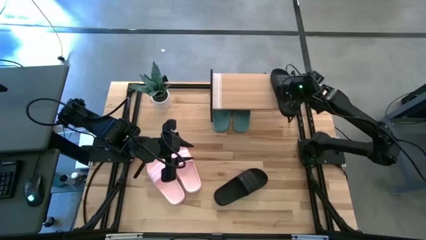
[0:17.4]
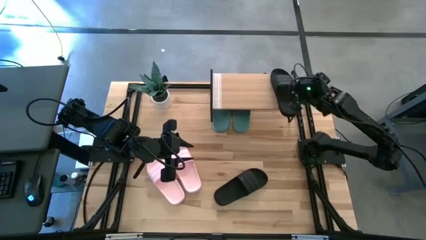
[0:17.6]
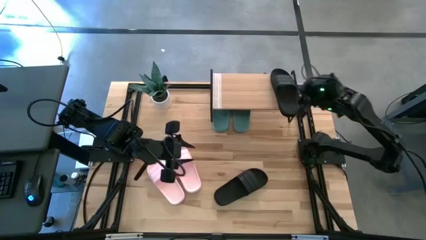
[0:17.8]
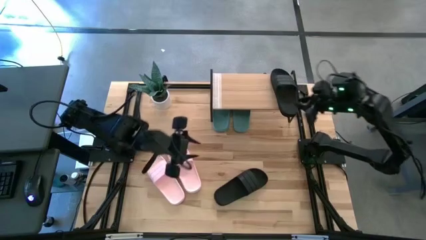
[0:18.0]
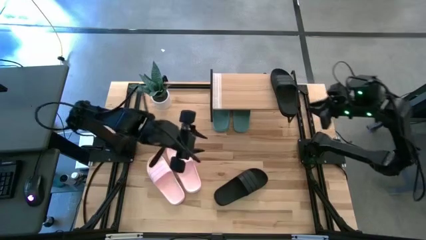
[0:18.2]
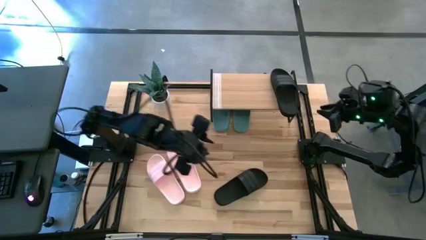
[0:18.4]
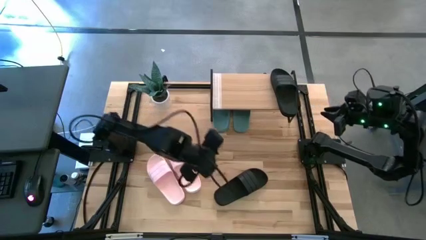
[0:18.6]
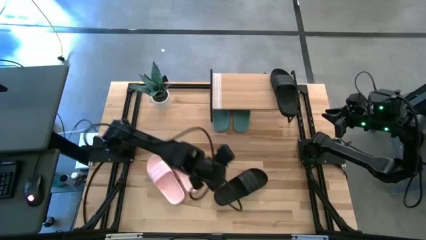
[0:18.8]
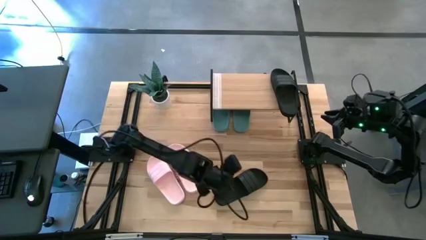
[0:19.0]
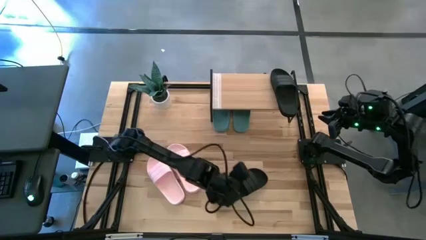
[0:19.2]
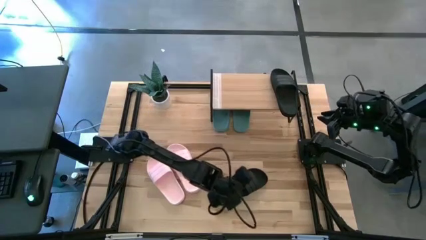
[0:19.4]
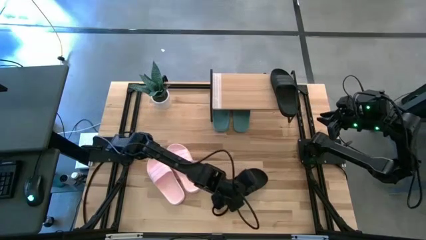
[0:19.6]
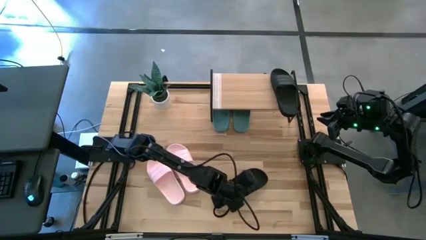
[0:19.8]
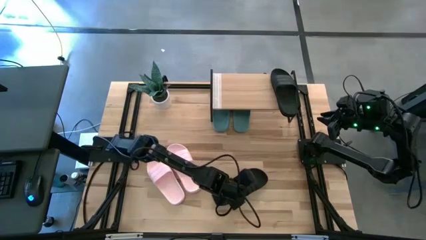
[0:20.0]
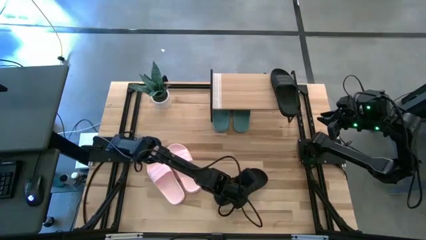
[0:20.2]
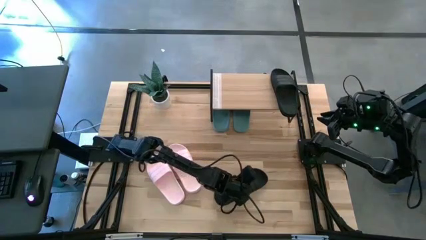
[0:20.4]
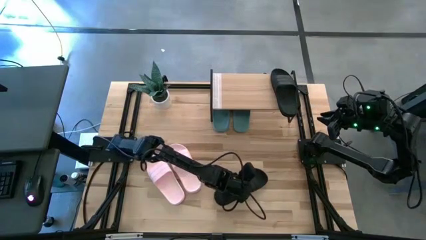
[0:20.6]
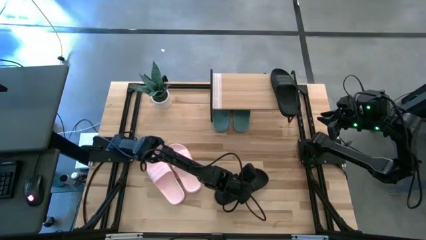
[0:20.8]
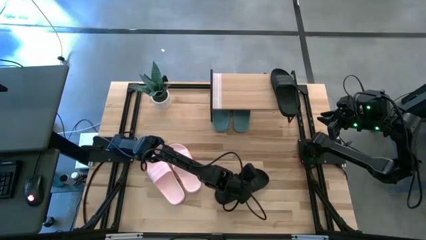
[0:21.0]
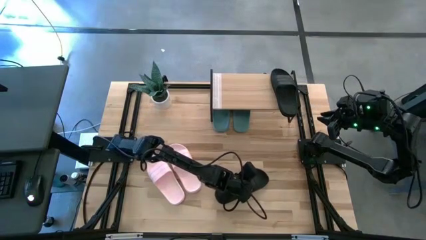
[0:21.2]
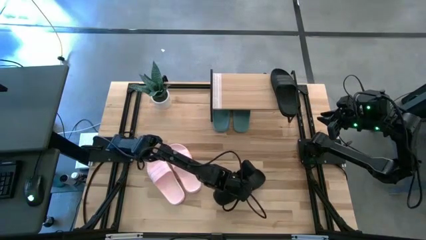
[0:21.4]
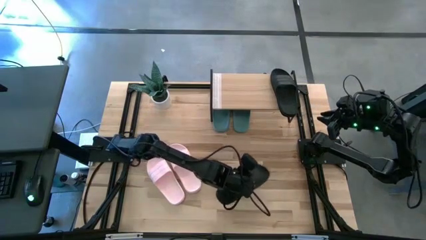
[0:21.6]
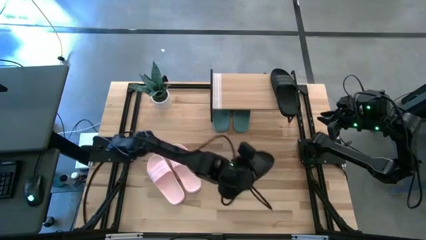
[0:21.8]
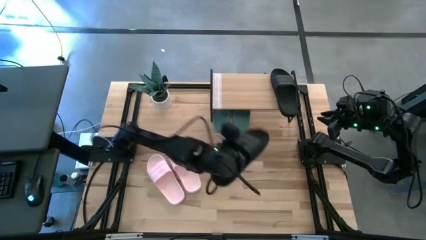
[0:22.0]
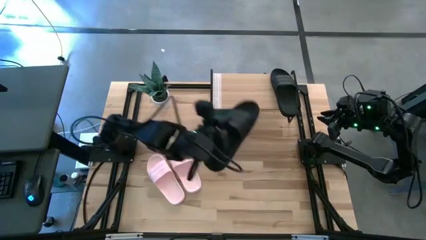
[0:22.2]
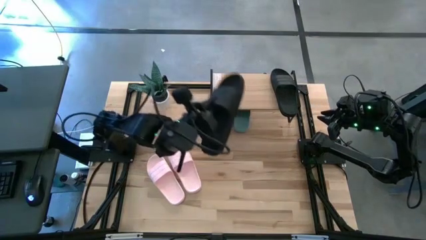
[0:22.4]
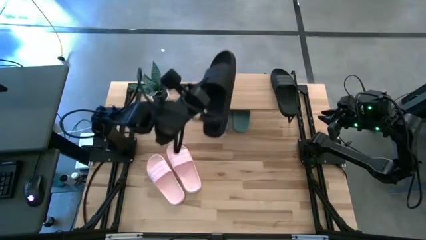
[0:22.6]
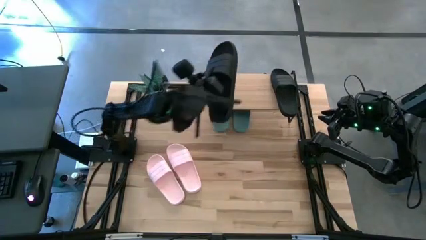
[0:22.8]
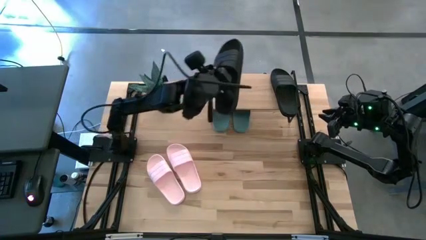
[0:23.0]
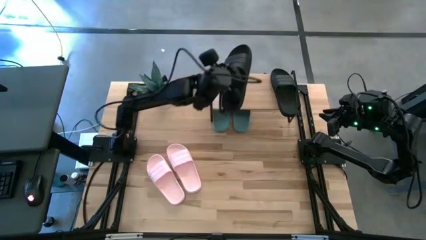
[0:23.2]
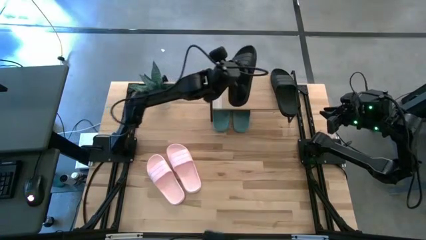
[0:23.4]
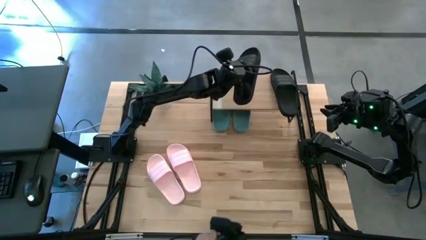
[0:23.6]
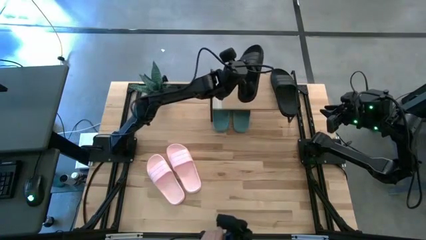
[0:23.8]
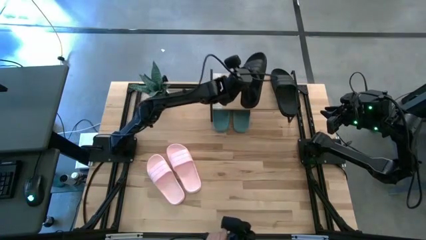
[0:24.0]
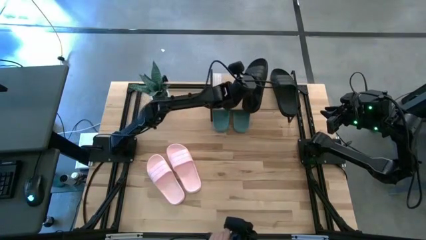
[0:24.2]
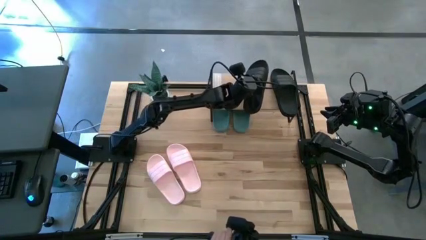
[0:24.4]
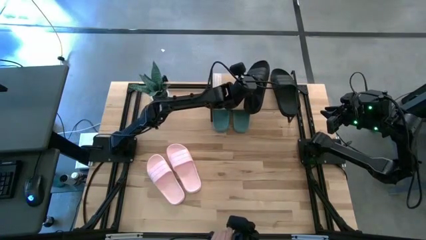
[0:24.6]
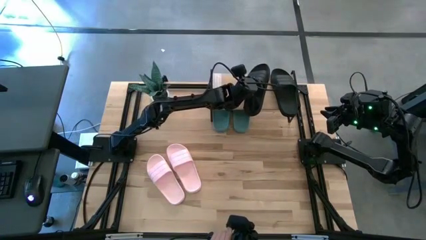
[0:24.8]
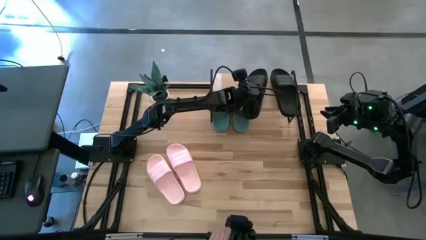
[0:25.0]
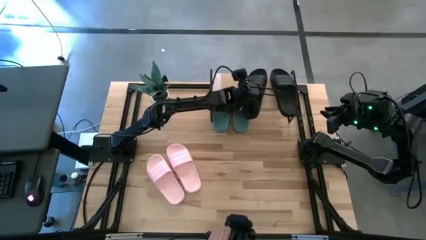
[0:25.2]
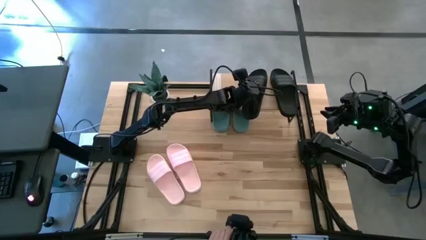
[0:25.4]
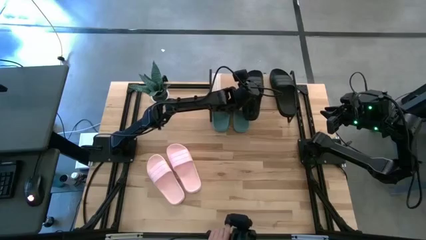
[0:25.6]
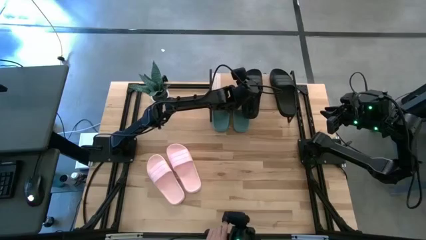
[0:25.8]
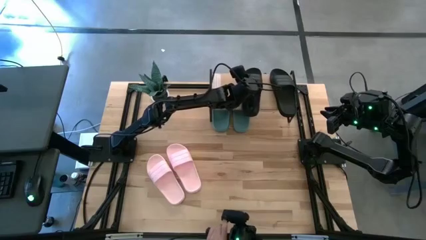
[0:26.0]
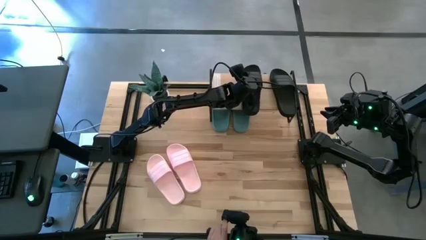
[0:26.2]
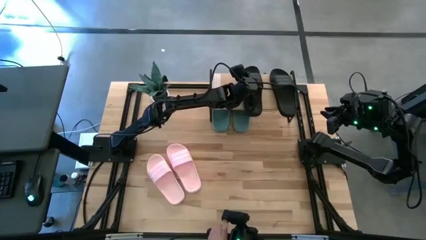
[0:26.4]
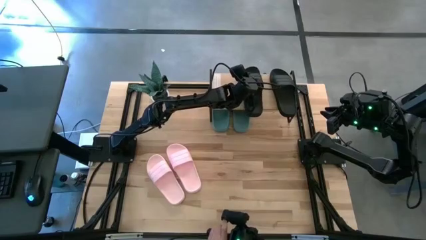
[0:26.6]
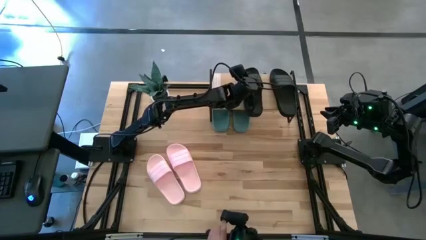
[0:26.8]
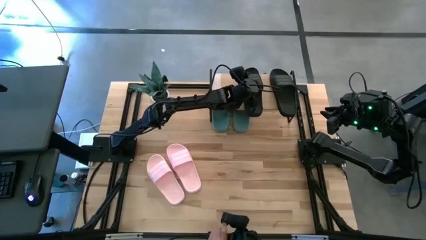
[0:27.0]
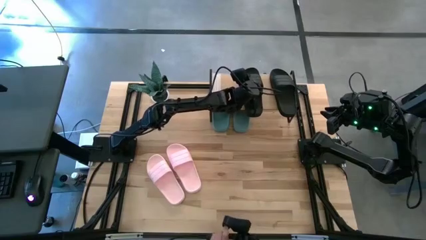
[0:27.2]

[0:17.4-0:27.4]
Task: Pick and place slides into the shelf
Put the black slipper on the shelf

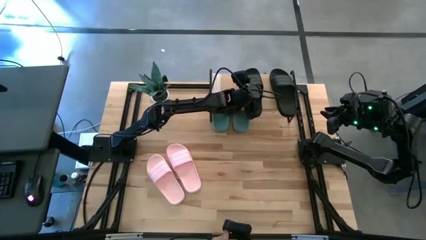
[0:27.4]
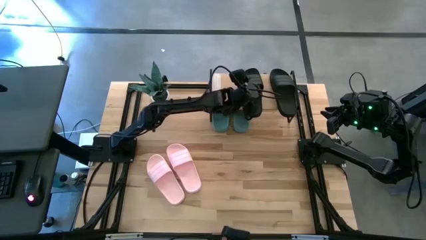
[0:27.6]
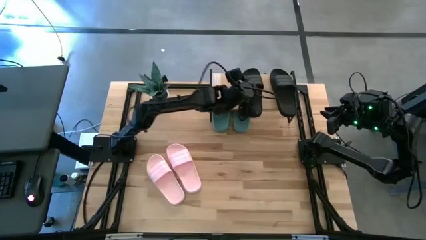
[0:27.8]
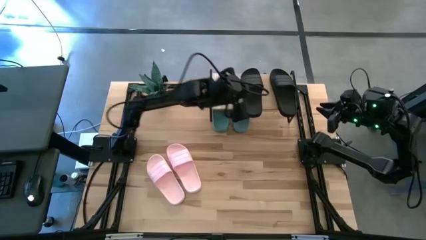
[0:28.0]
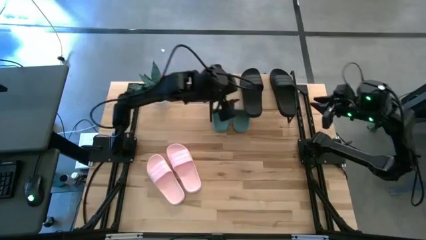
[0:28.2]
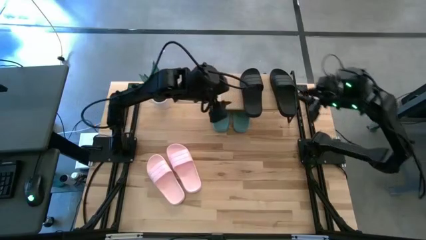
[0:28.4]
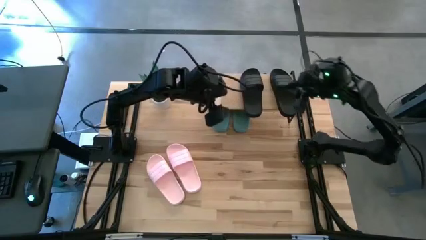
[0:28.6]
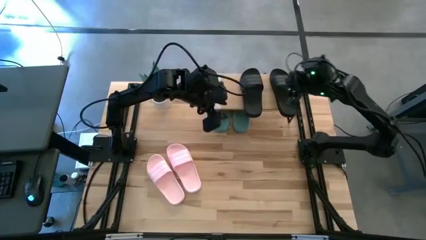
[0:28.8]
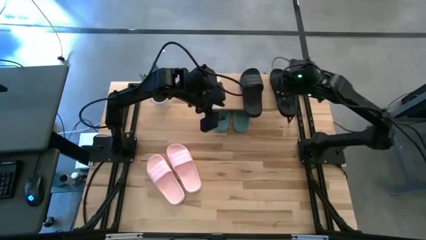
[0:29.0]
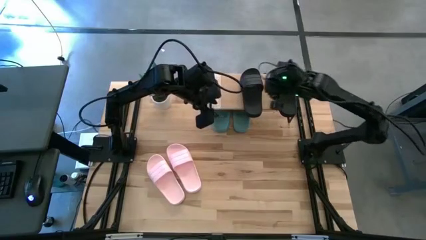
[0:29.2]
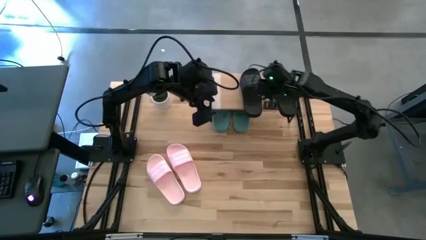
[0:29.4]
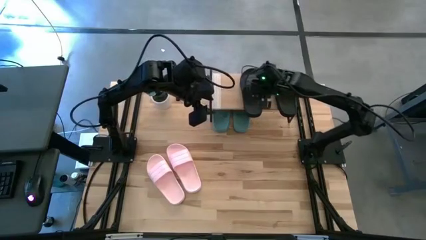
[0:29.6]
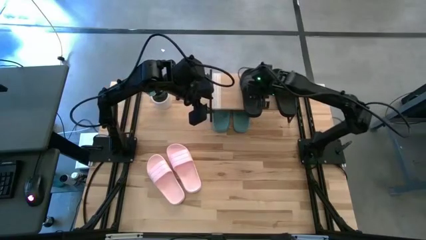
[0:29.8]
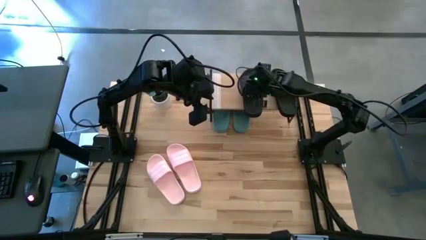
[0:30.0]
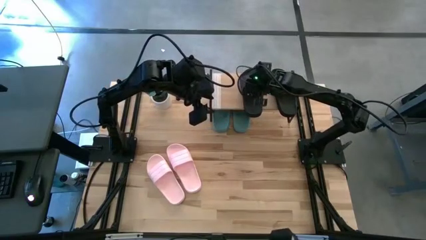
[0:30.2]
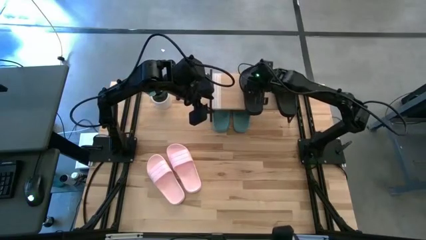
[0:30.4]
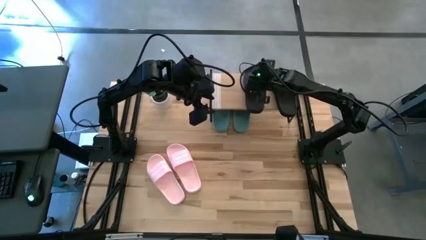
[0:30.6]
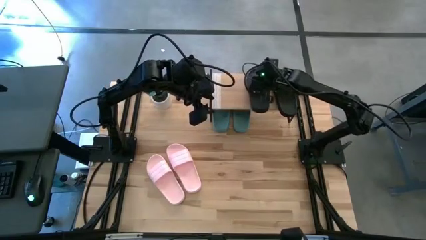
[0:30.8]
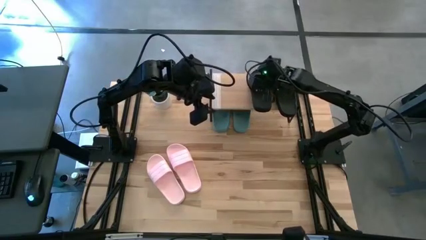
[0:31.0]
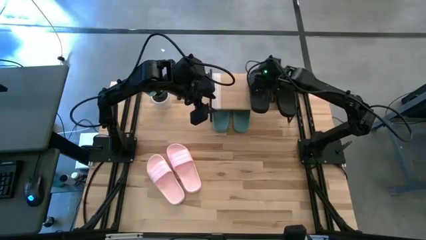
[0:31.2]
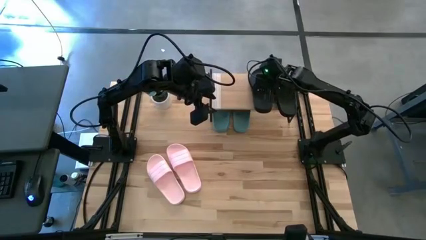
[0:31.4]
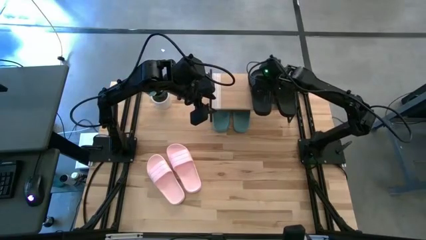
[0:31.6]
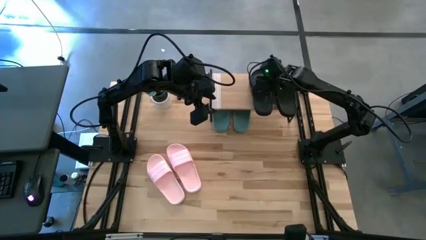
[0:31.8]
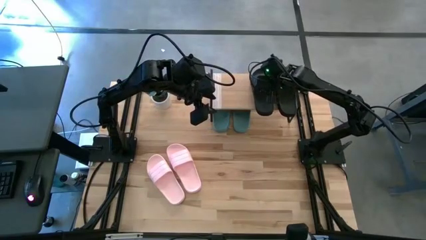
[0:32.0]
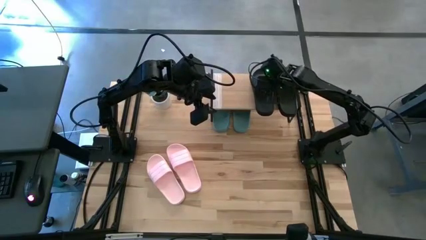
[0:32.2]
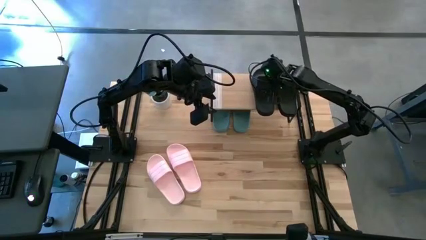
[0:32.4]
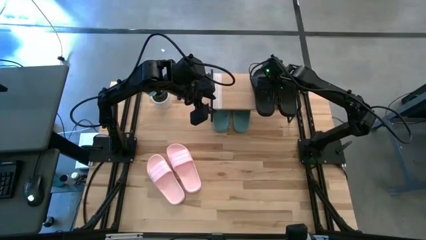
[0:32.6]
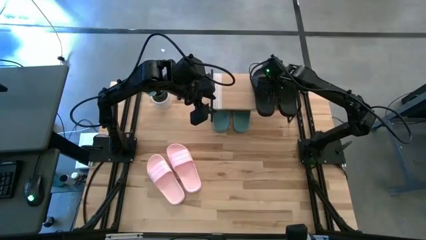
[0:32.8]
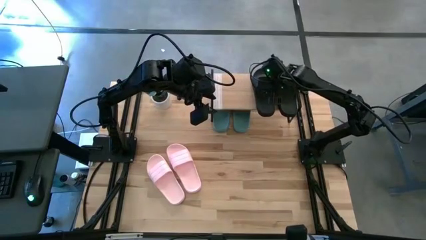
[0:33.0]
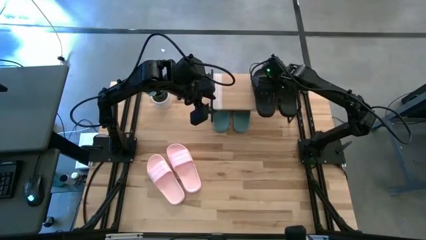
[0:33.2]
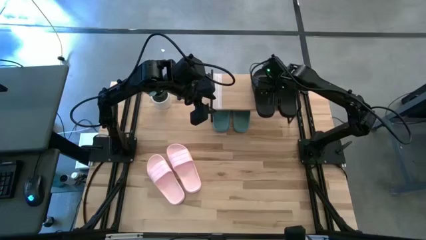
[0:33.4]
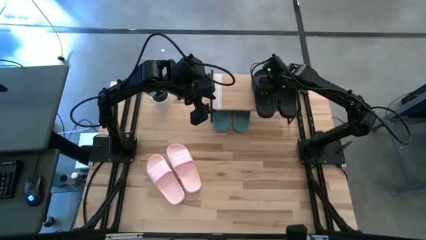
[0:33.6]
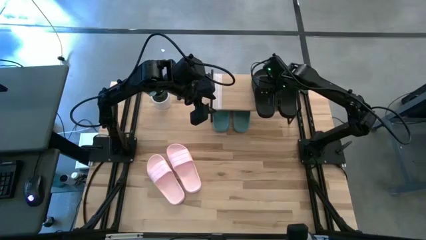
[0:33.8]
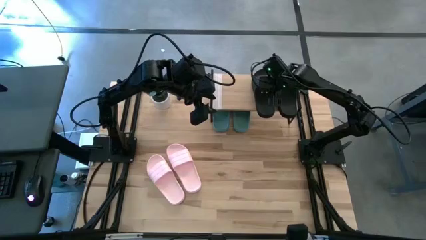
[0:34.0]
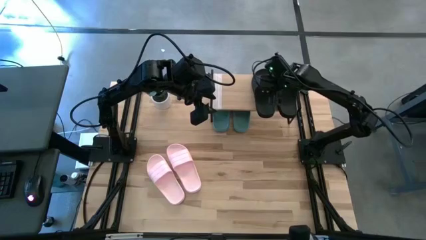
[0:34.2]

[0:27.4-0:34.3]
Adjust the black slipper on the shelf
